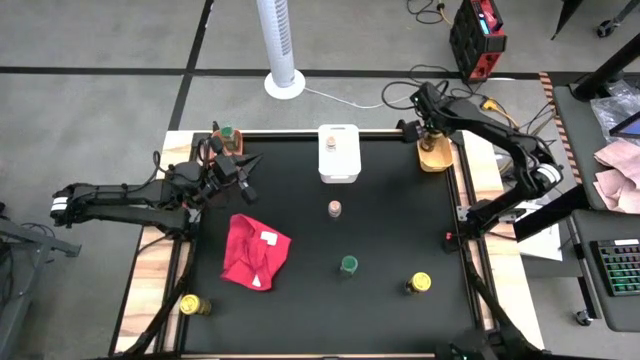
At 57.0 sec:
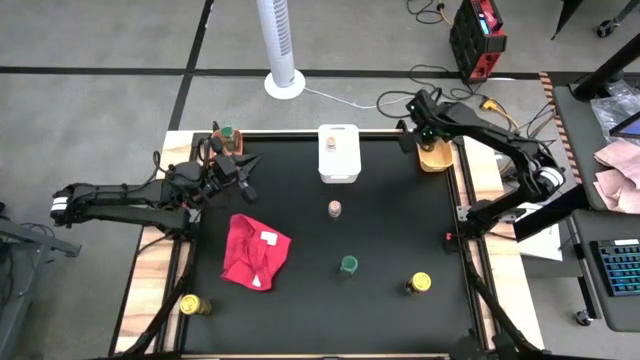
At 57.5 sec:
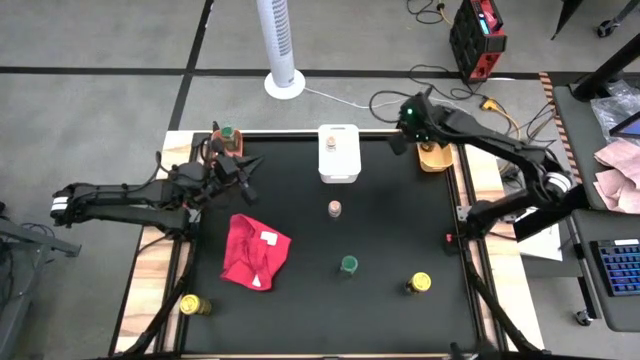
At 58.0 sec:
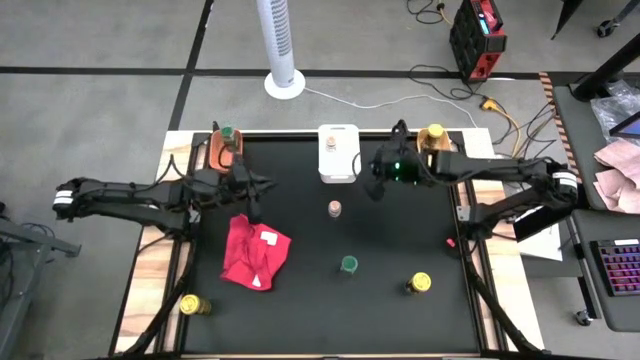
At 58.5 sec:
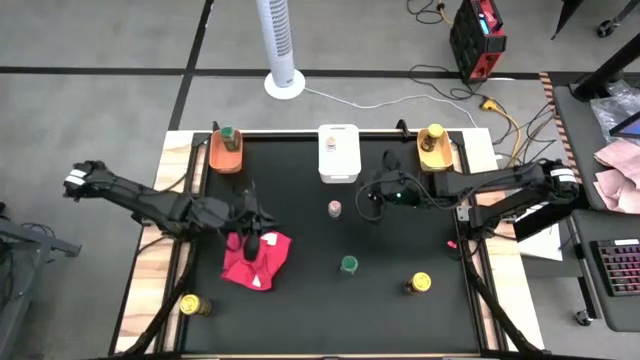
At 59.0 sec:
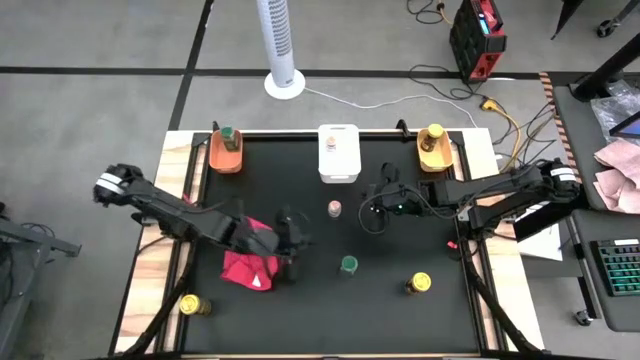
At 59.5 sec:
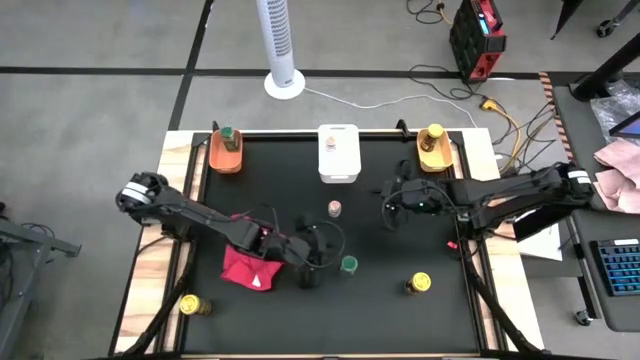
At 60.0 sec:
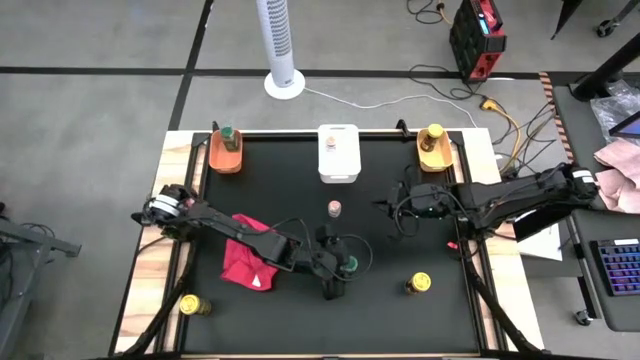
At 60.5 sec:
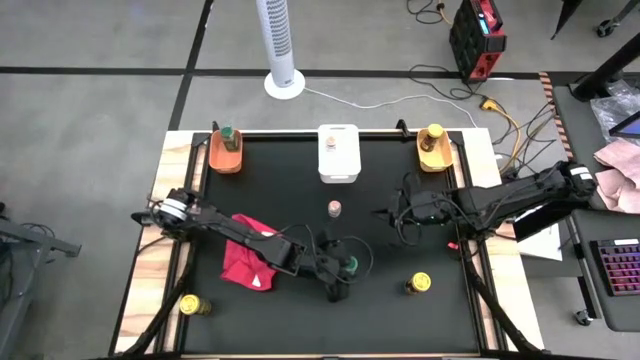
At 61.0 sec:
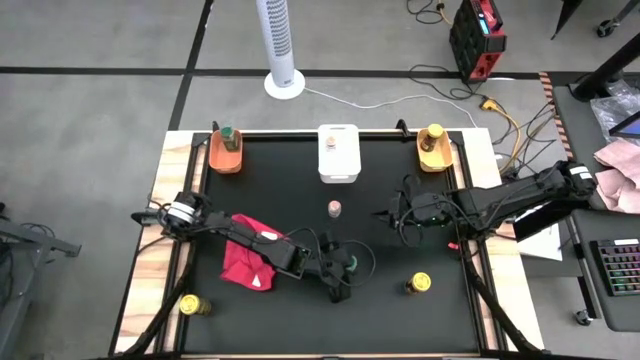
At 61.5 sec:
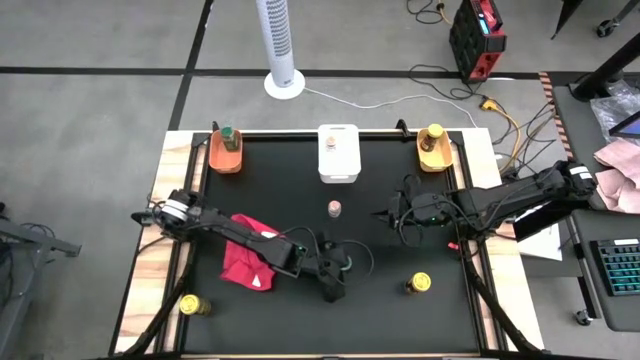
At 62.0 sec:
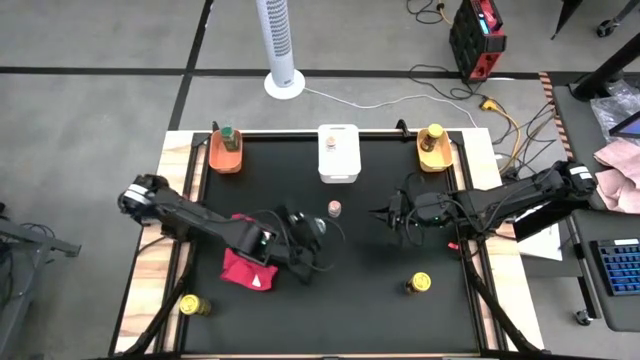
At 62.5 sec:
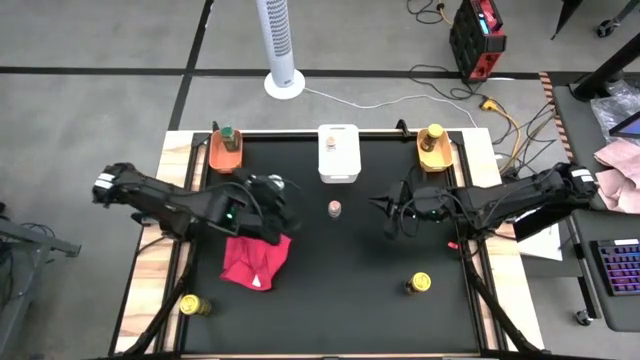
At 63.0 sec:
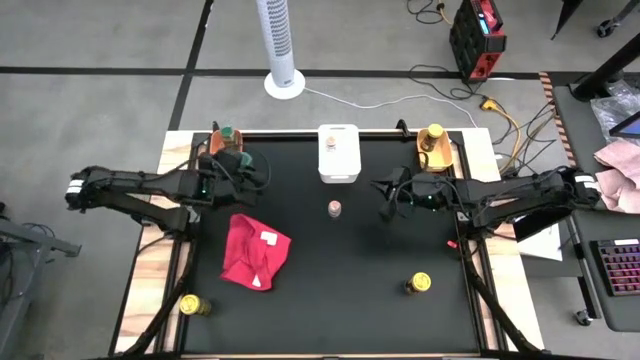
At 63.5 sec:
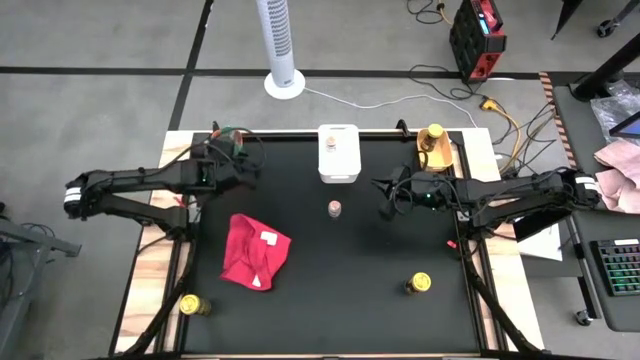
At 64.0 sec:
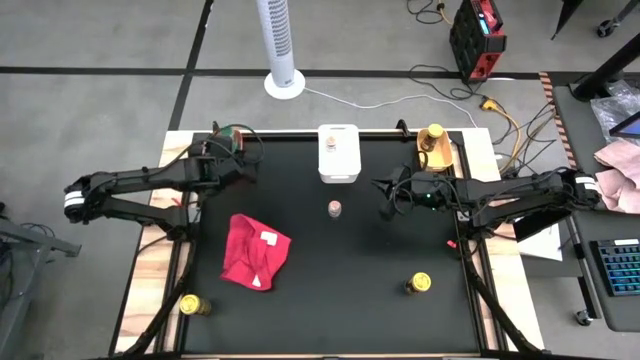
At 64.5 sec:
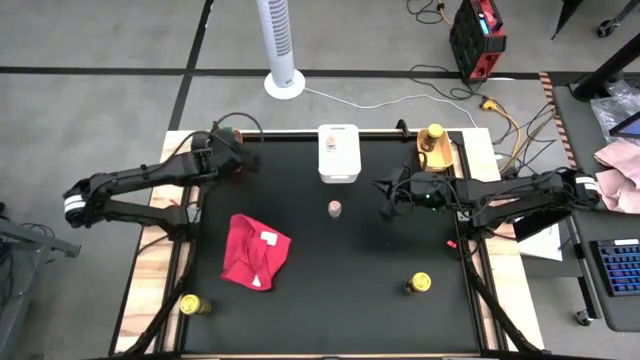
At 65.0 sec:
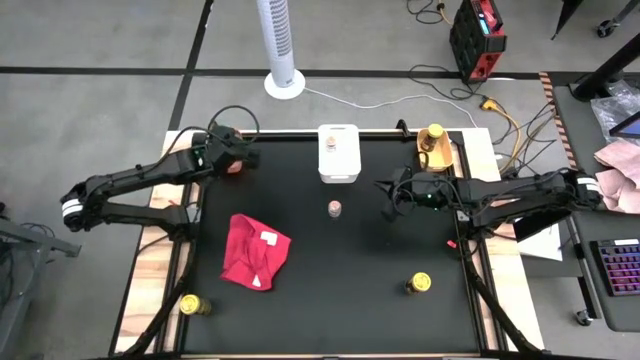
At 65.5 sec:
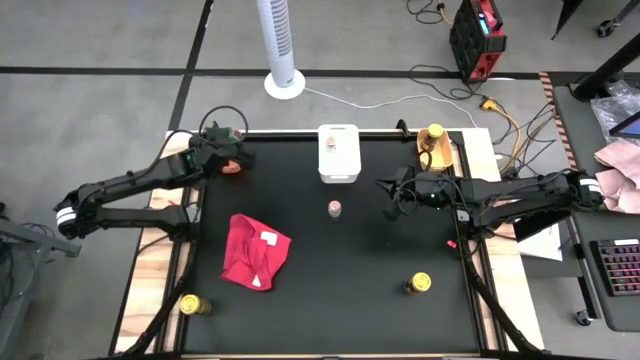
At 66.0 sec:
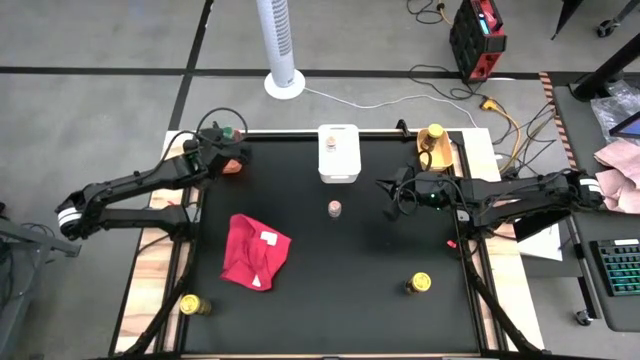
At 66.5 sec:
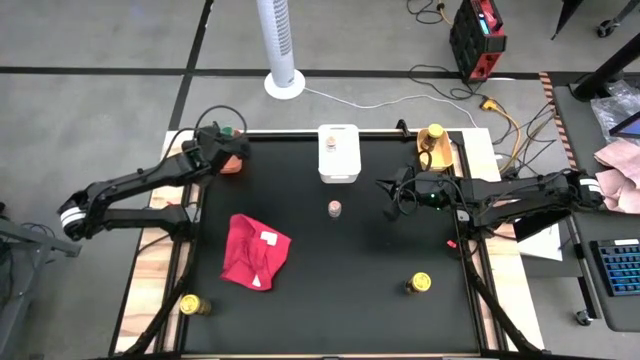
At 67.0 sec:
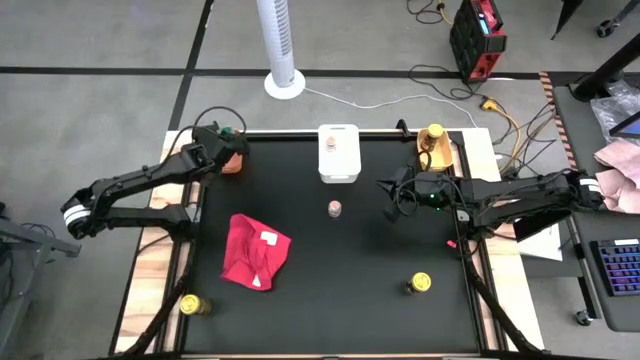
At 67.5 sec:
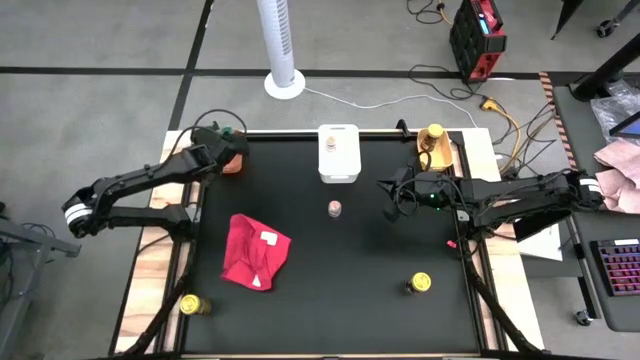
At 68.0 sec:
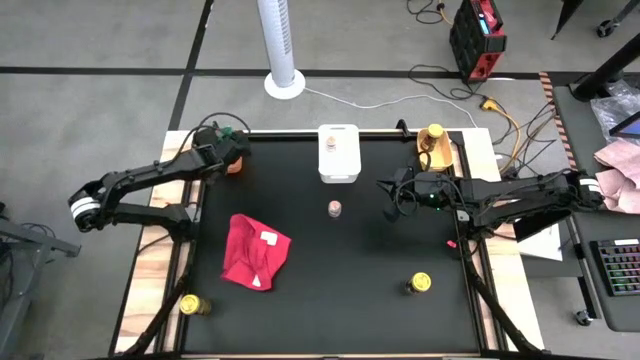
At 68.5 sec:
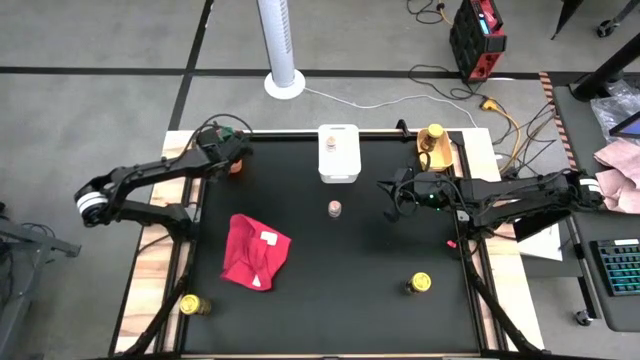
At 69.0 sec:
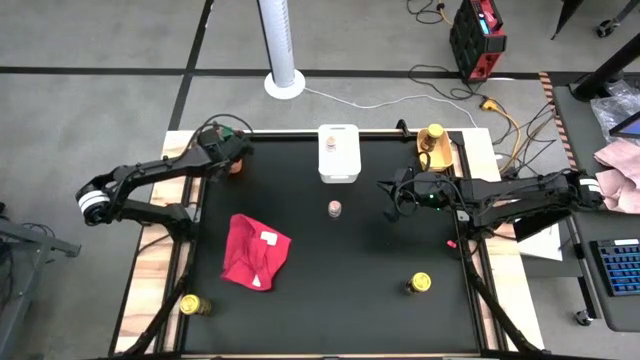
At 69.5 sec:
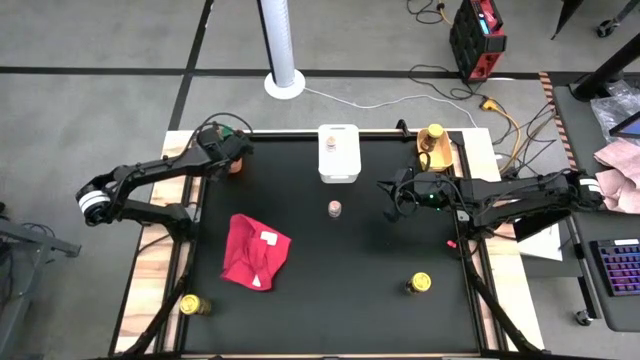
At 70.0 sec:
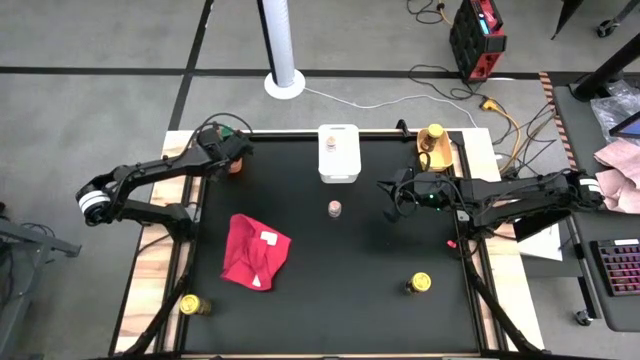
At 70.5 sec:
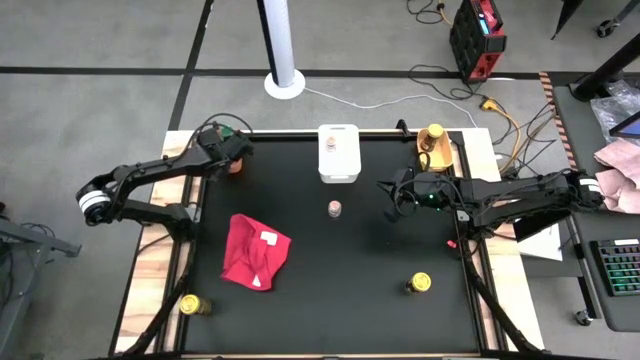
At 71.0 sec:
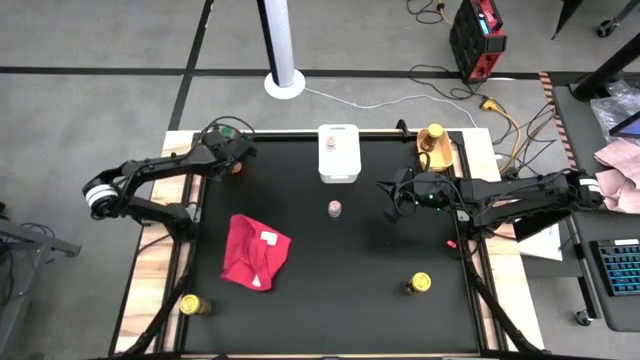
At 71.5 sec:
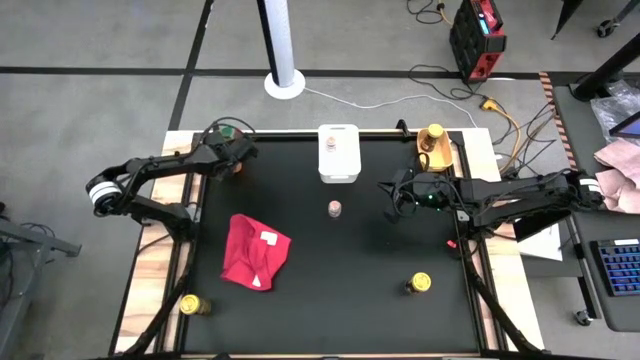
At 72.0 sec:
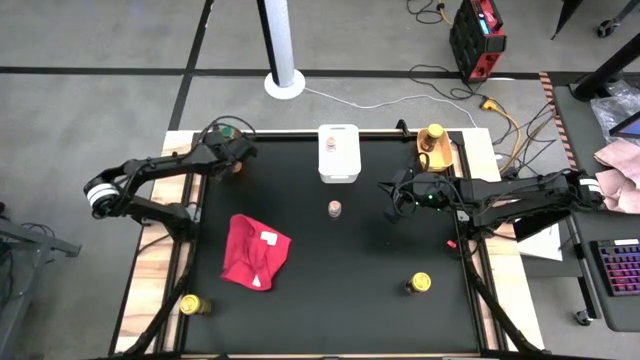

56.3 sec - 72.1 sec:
Task: Sort spices by type
Put the green seasoning bottle into the orange bin

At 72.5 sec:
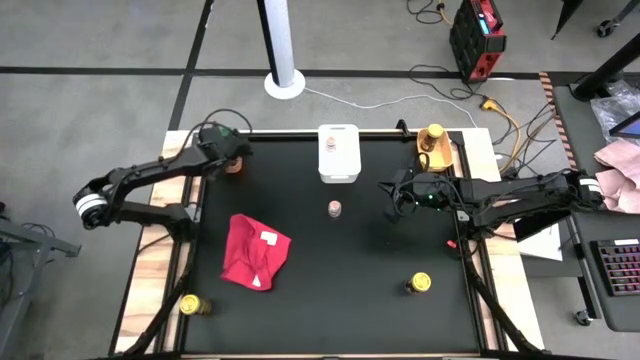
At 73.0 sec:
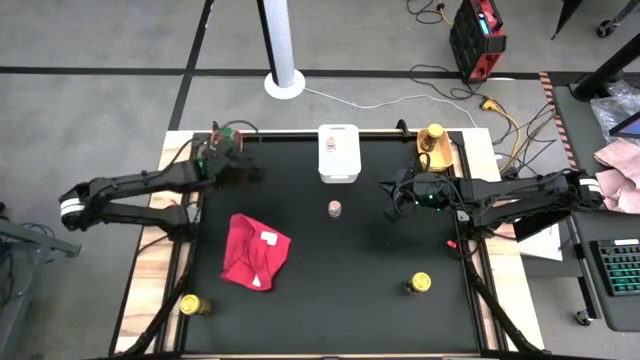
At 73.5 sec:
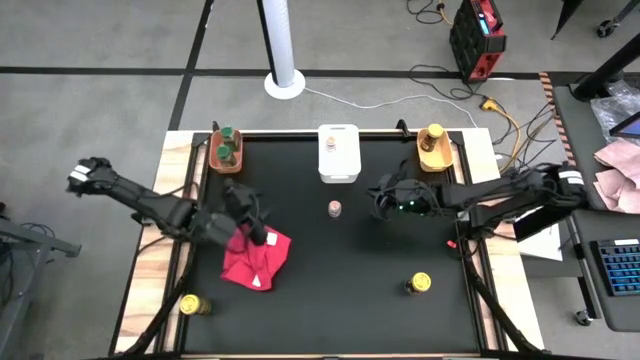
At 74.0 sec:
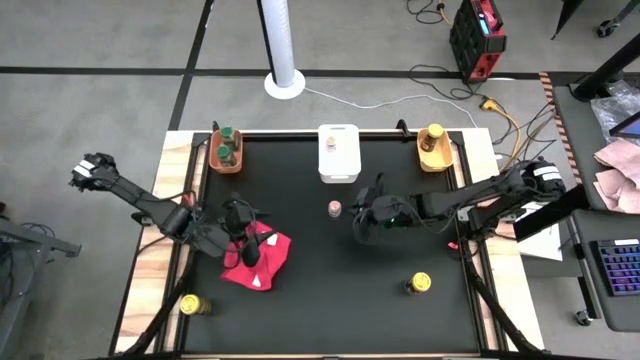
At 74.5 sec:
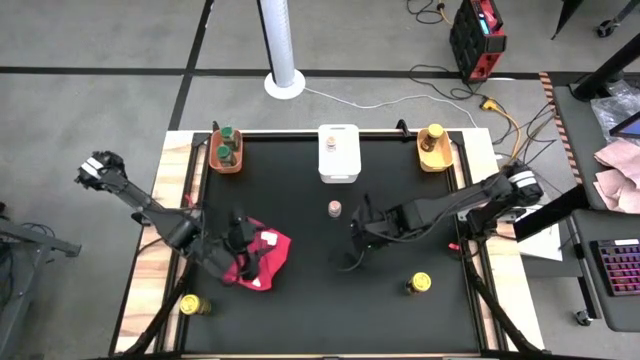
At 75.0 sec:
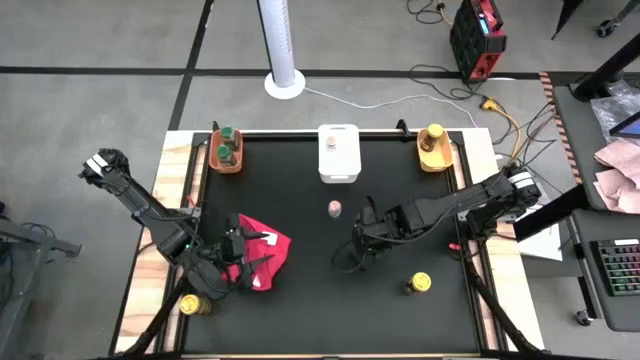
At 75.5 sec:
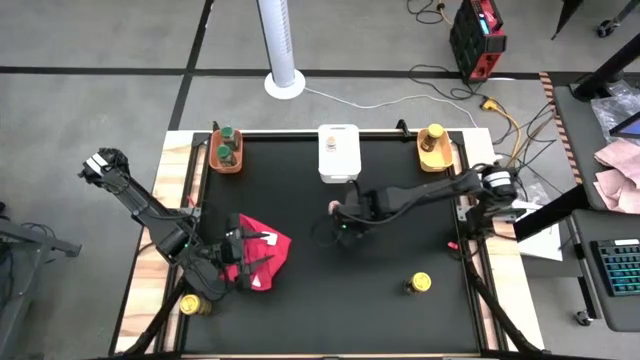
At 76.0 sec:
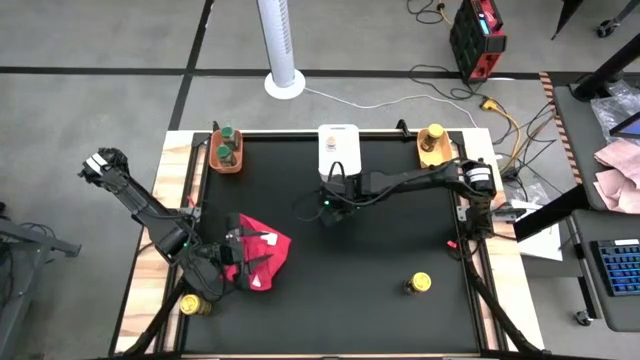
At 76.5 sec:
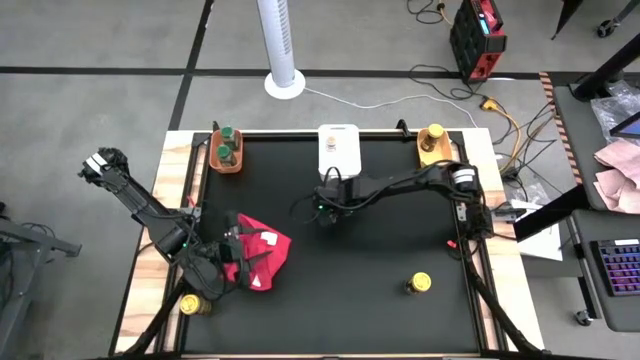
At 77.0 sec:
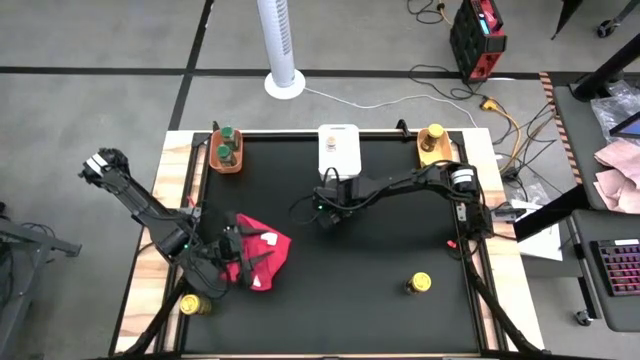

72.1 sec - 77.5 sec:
Put the brown seasoning bottle into the white bin
